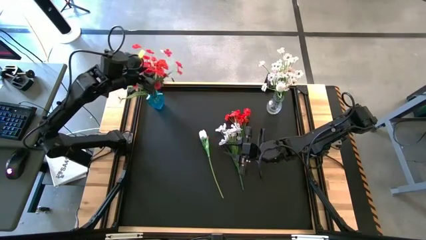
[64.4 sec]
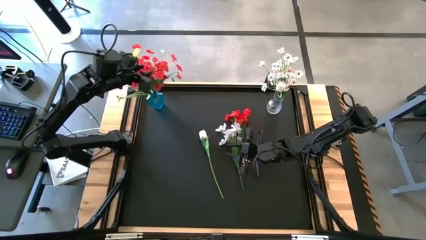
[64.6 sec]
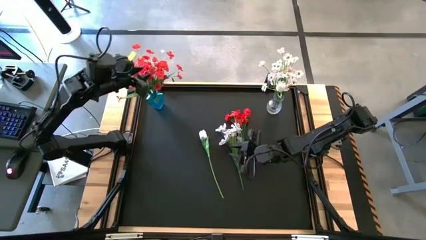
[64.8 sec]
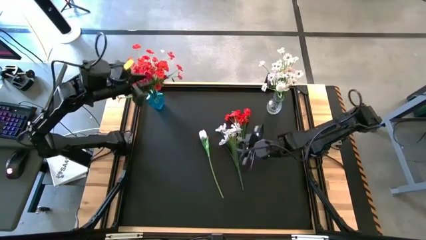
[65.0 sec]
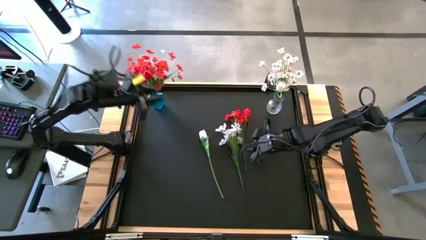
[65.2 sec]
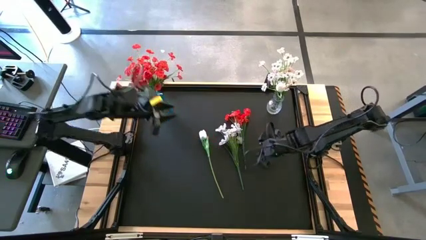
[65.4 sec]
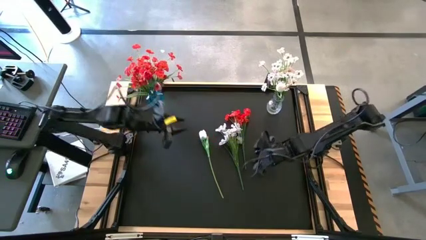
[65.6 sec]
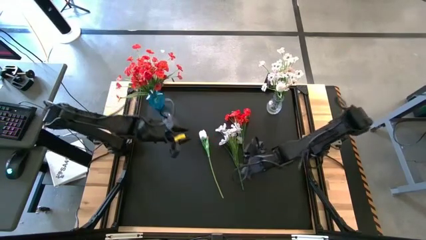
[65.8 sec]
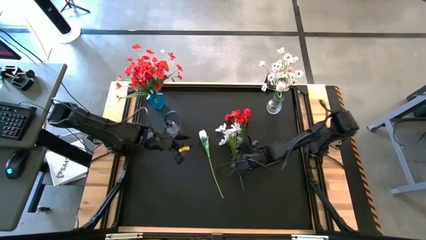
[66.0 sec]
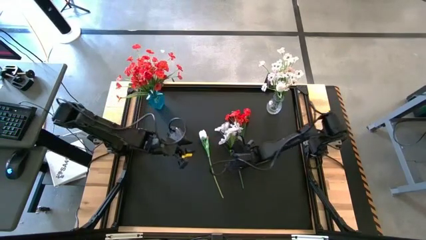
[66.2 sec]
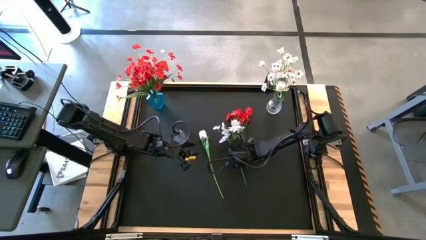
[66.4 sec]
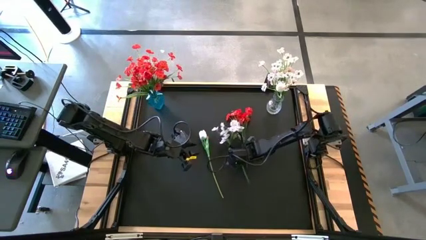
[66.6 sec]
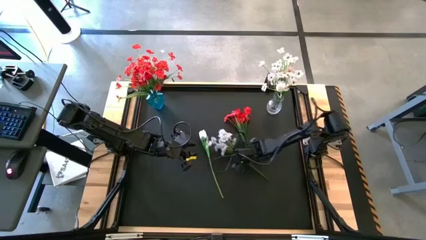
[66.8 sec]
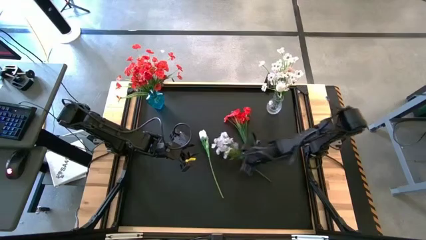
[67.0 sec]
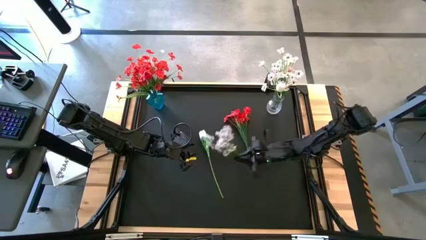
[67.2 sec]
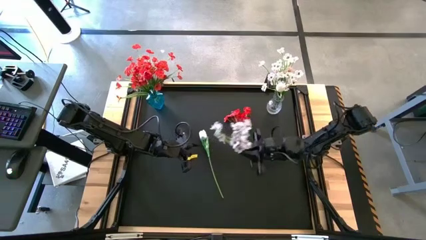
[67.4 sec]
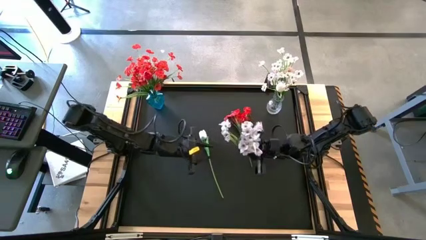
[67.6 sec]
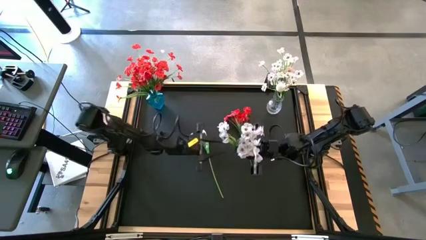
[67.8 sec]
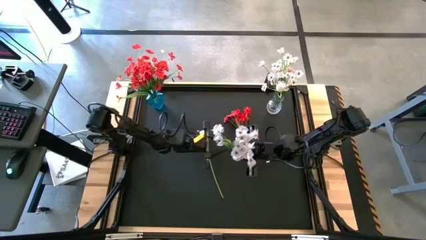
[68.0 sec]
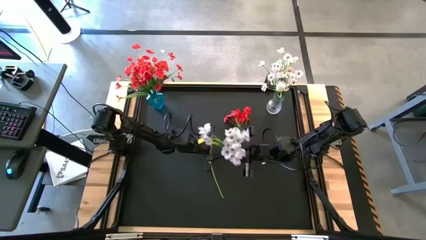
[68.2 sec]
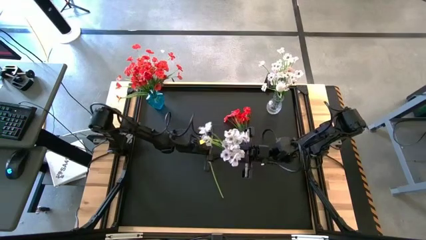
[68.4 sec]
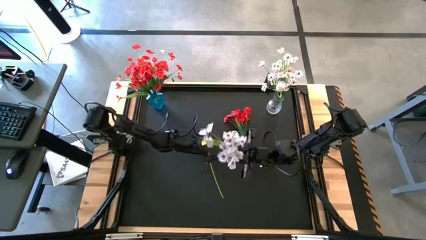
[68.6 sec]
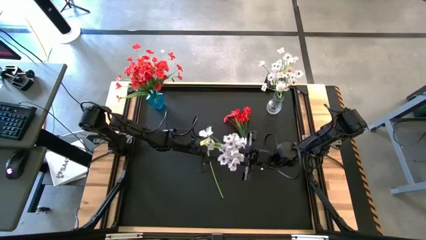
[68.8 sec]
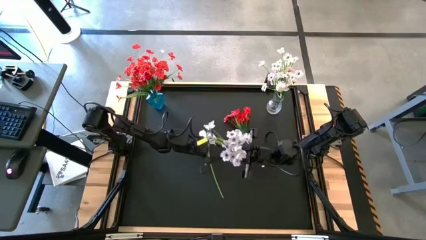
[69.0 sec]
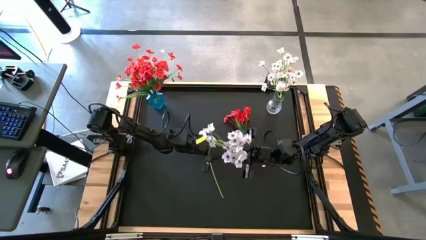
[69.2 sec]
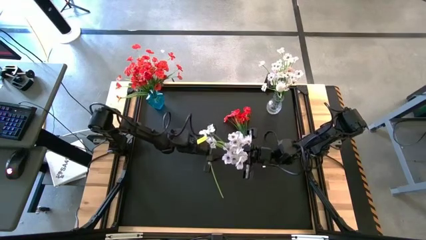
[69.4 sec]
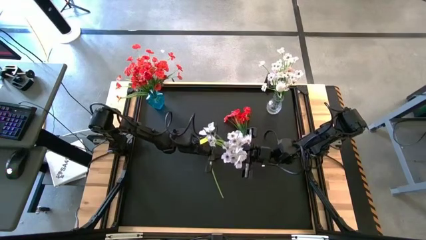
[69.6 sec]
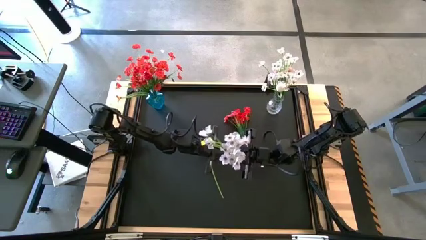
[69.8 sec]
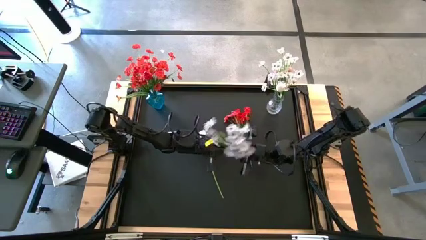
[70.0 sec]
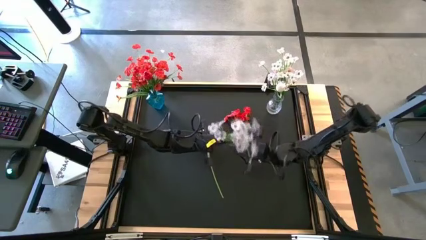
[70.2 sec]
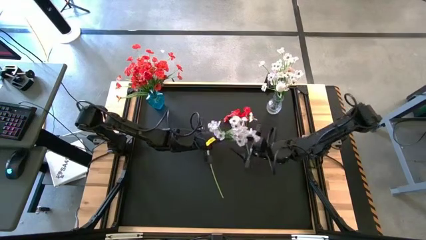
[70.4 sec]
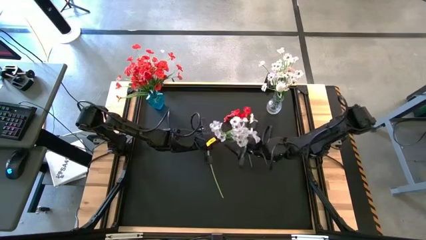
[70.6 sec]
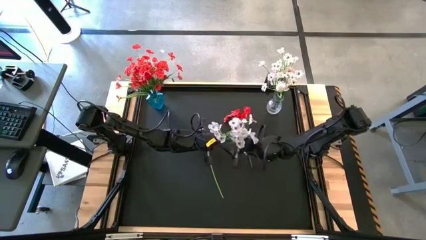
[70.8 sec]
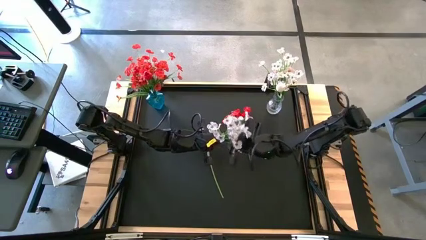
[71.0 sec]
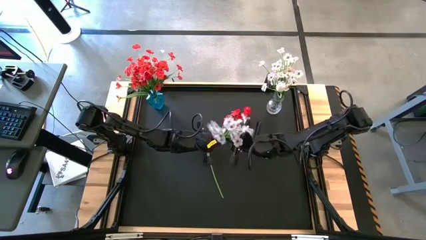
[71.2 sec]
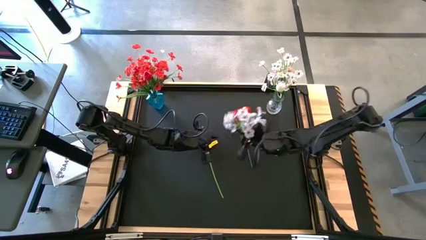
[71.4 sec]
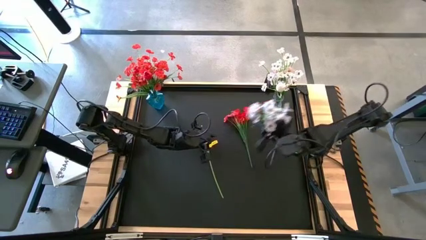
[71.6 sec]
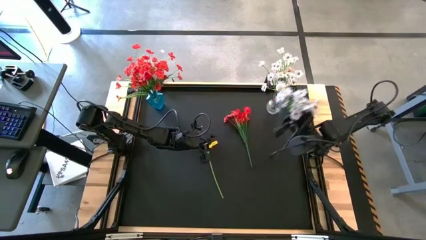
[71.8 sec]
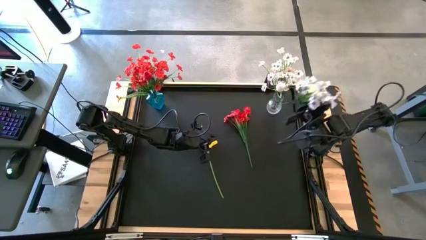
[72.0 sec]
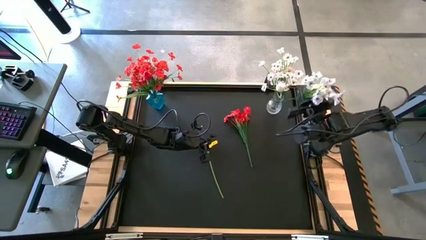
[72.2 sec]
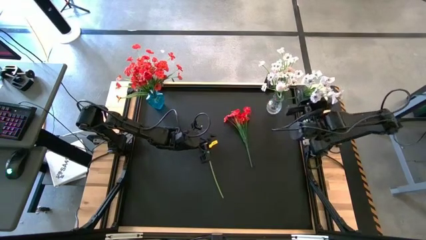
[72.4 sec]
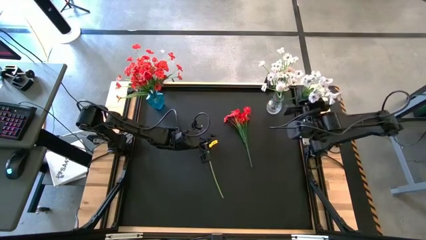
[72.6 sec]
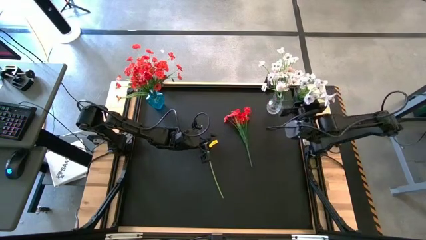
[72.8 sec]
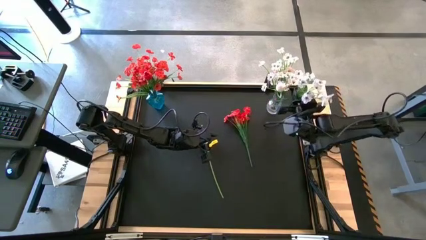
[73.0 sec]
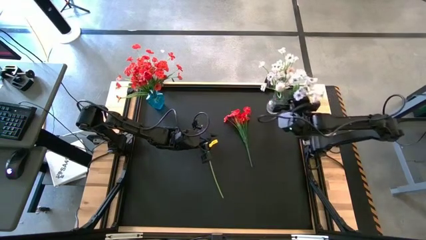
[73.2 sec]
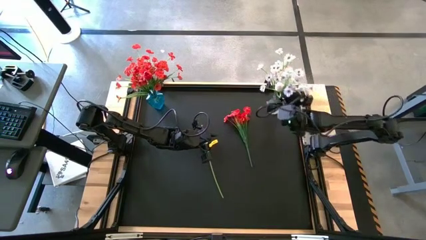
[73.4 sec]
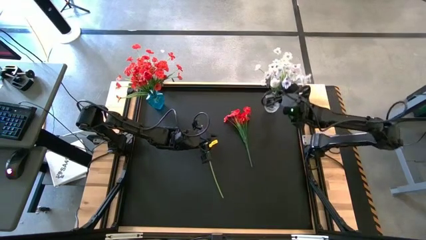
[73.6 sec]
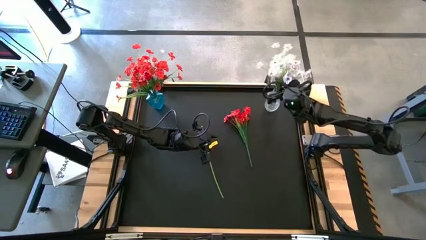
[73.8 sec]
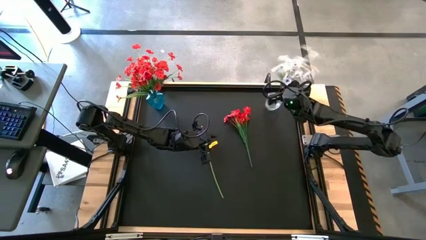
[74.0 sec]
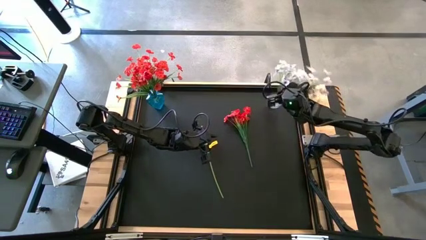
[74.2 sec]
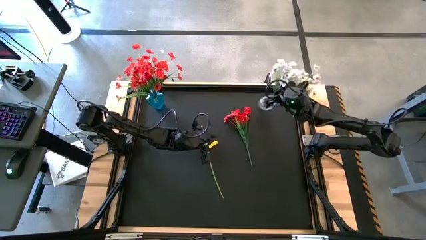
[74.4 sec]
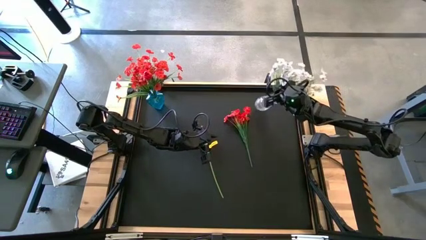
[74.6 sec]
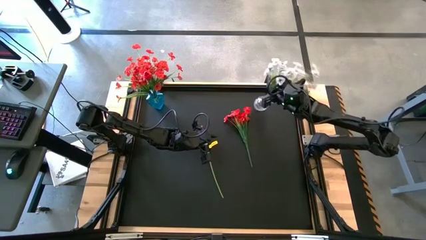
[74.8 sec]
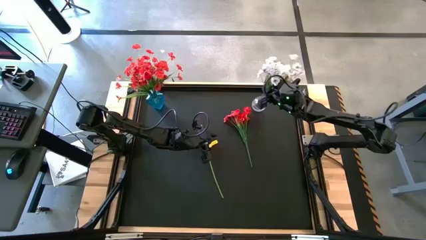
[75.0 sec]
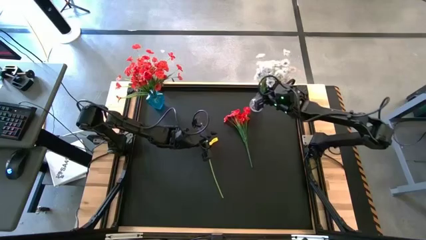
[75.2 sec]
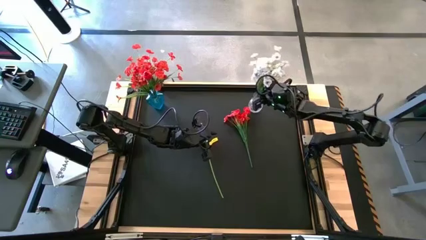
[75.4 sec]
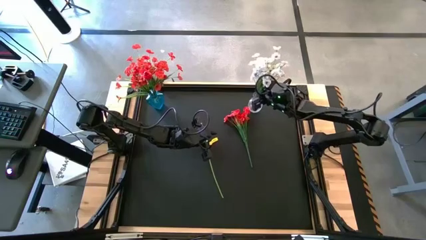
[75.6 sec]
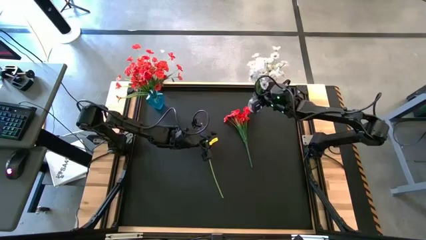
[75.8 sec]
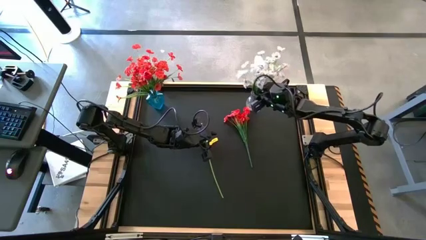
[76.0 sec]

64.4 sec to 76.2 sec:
Task: Sort flowers into vase by color
Put the white orchid into the transparent vase

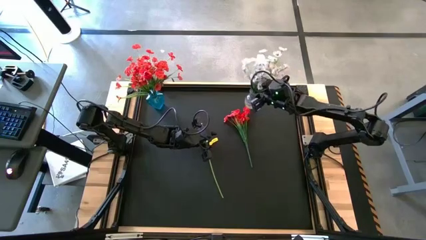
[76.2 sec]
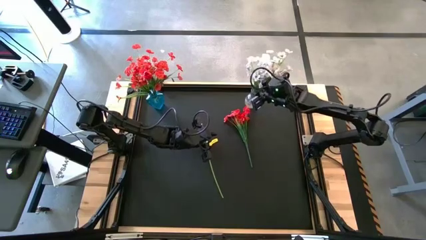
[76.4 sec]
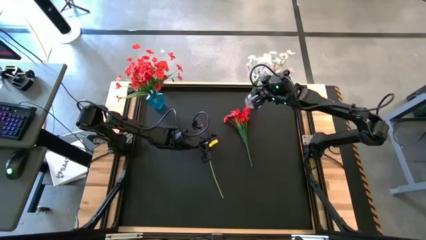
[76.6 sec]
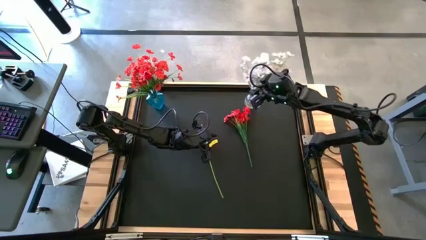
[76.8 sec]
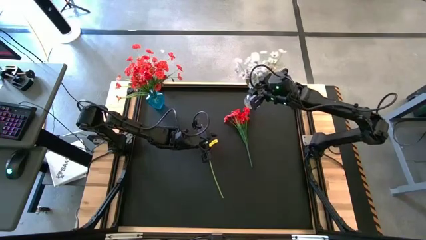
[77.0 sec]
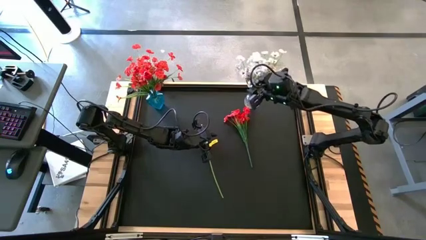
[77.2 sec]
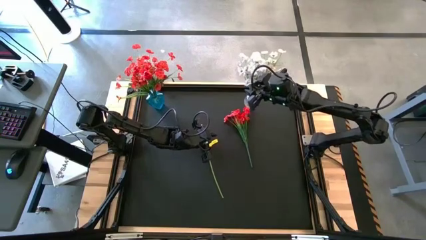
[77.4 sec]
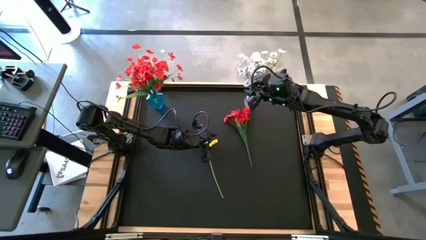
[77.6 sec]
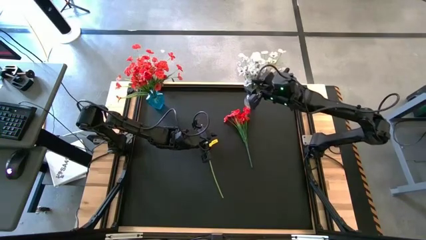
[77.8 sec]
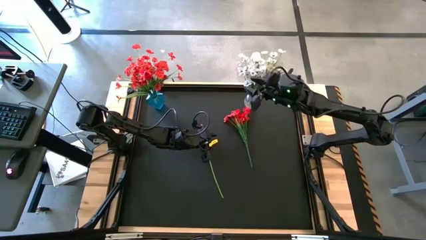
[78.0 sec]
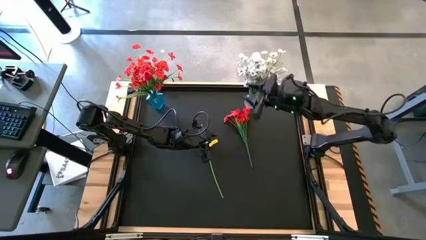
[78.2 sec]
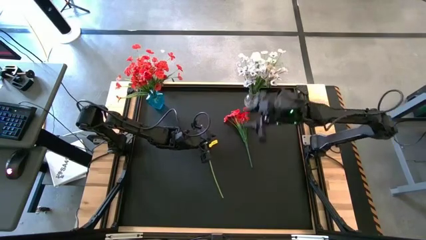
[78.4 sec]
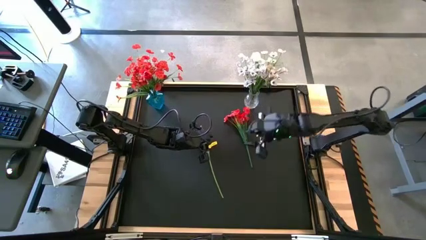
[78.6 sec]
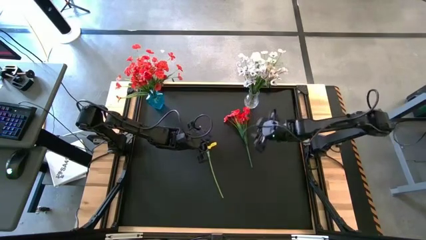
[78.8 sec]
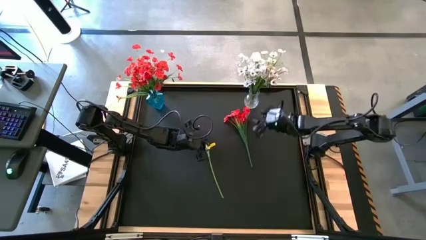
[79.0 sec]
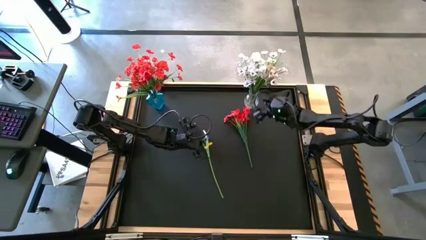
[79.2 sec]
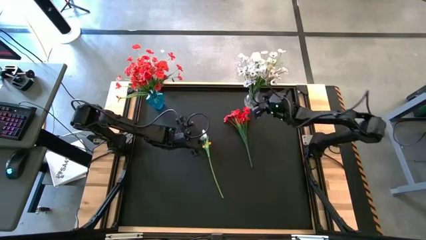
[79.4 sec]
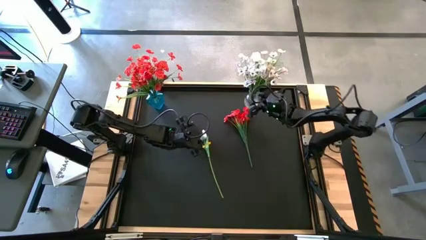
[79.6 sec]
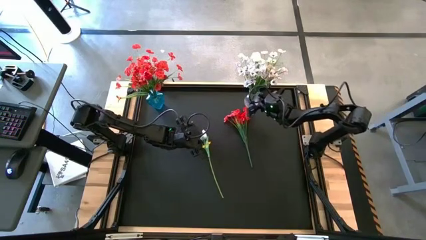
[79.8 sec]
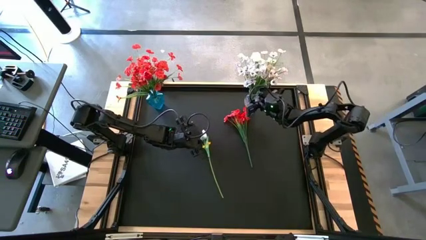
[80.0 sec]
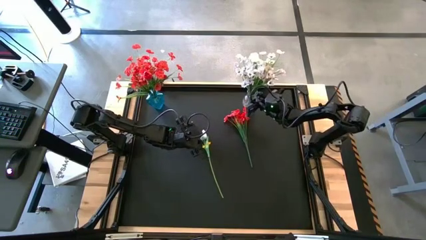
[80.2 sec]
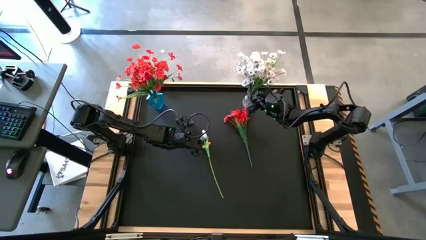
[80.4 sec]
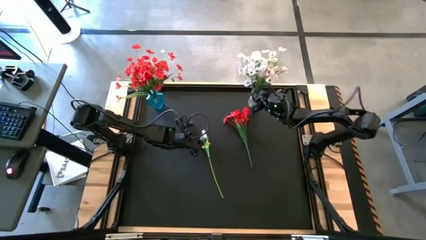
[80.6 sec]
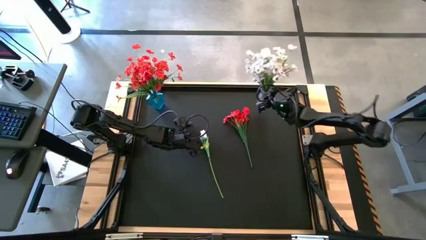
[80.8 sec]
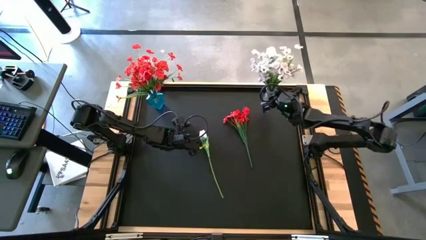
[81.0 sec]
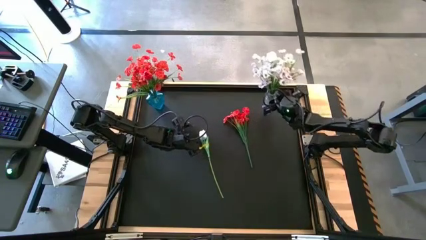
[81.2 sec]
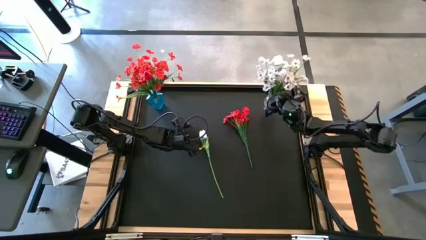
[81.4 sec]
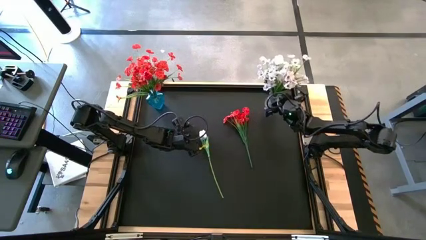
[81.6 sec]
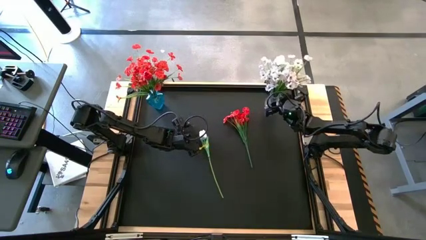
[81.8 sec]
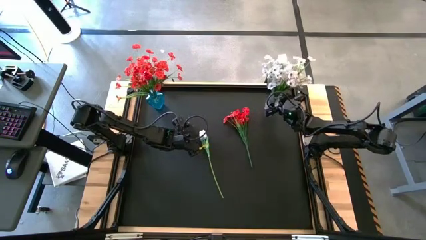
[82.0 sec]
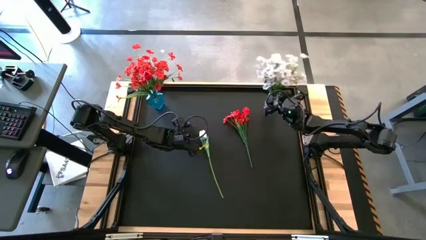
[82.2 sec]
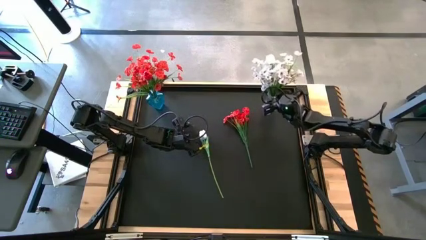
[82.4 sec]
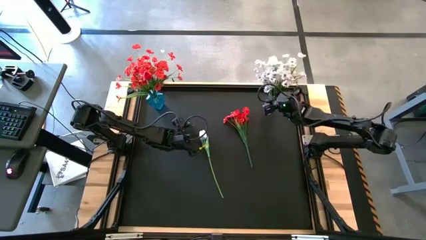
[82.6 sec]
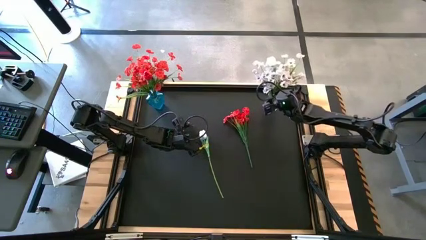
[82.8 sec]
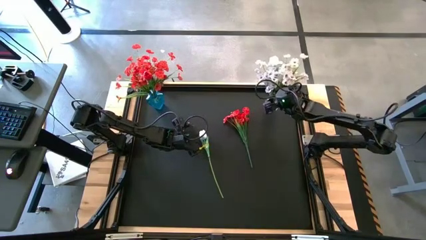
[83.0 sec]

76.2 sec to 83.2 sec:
Adjust the transparent vase
